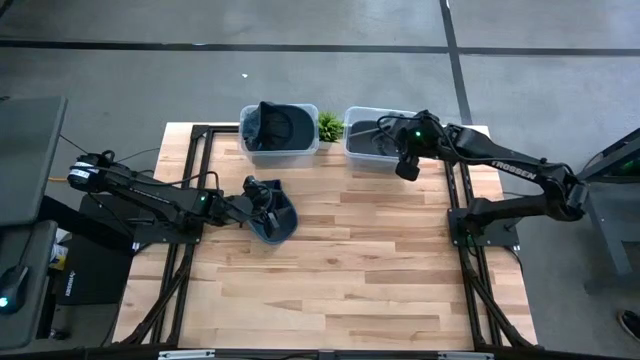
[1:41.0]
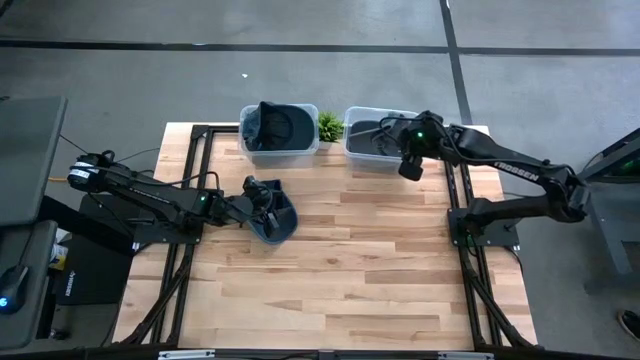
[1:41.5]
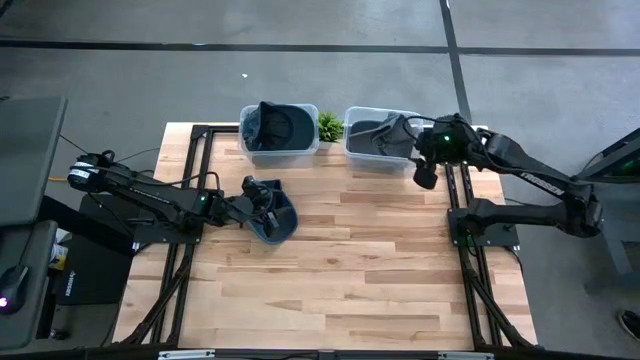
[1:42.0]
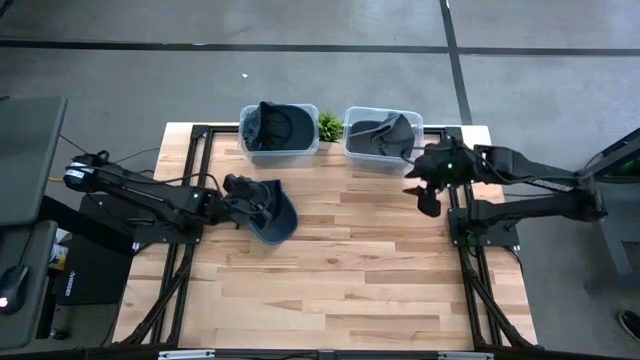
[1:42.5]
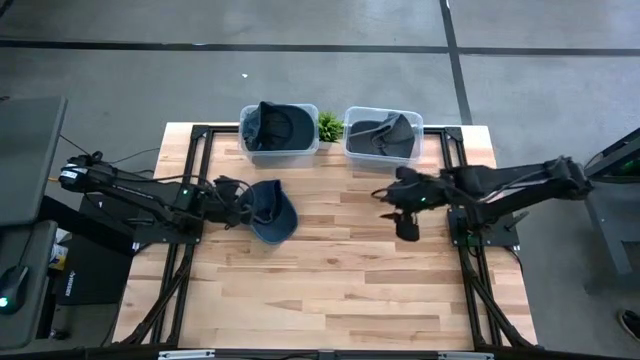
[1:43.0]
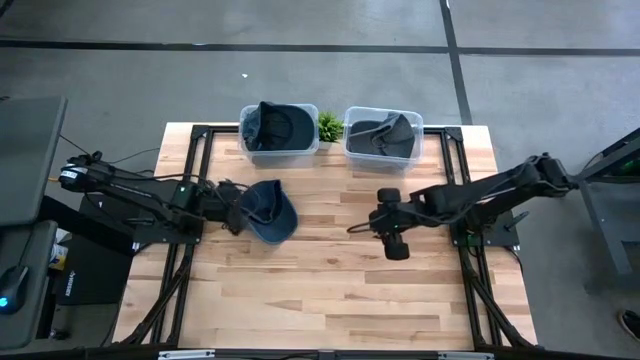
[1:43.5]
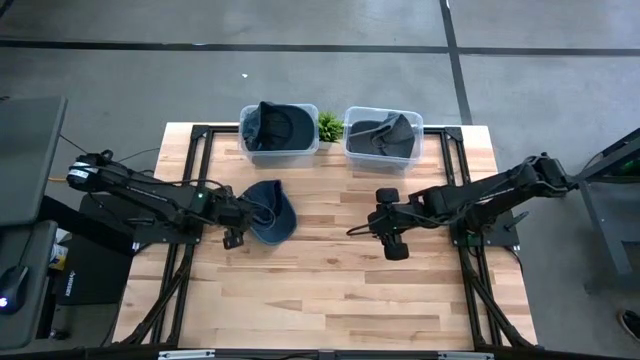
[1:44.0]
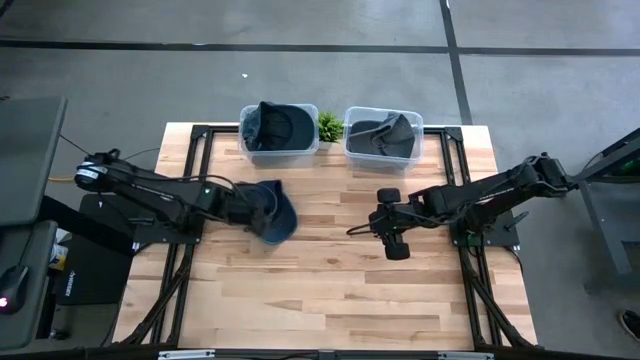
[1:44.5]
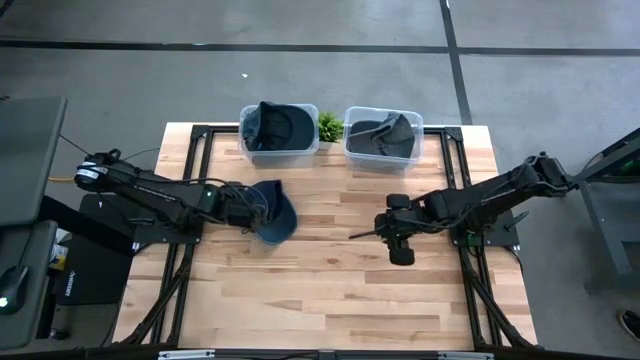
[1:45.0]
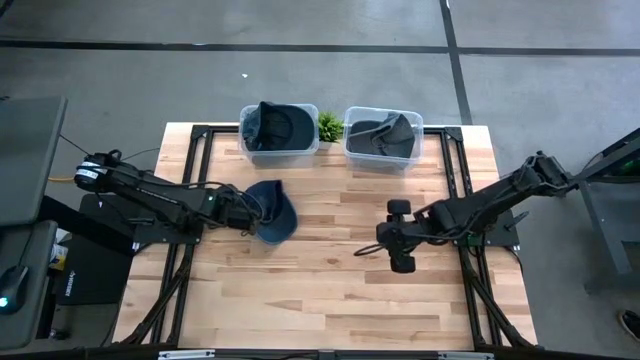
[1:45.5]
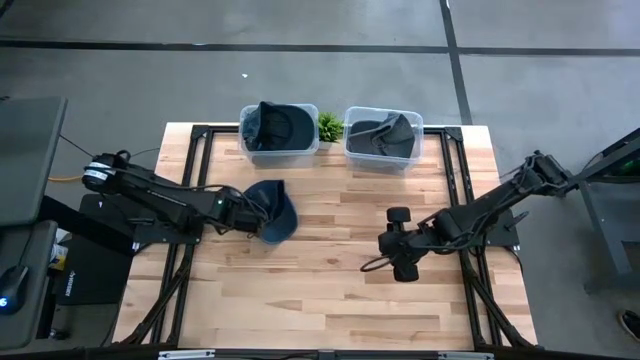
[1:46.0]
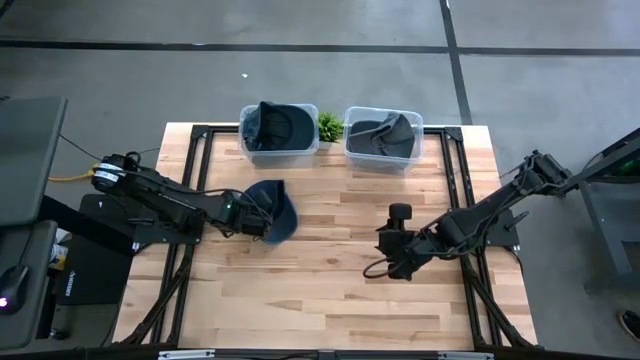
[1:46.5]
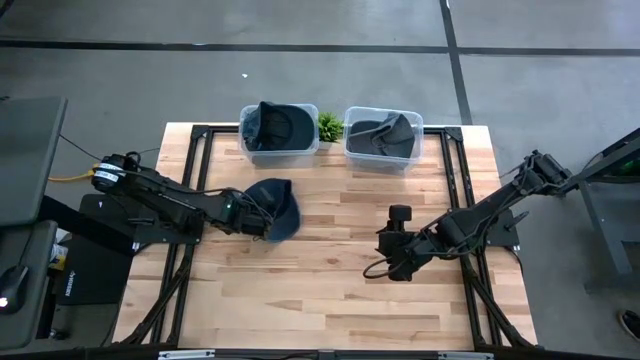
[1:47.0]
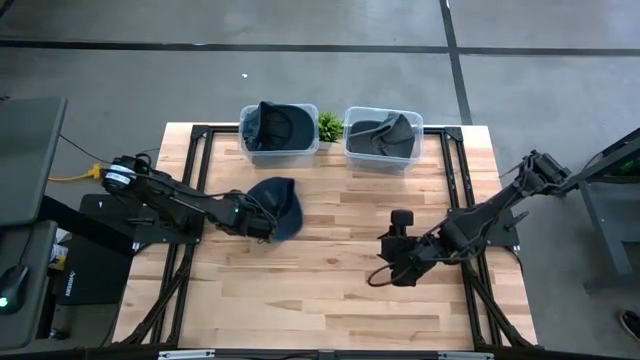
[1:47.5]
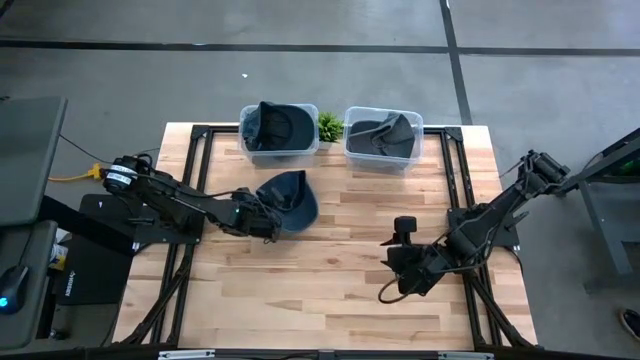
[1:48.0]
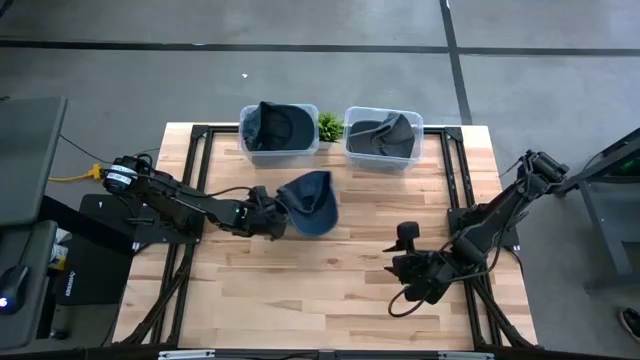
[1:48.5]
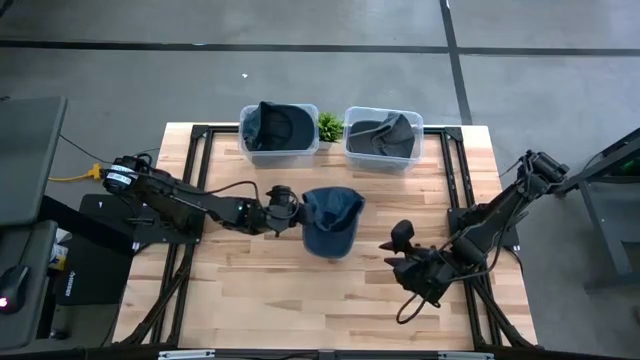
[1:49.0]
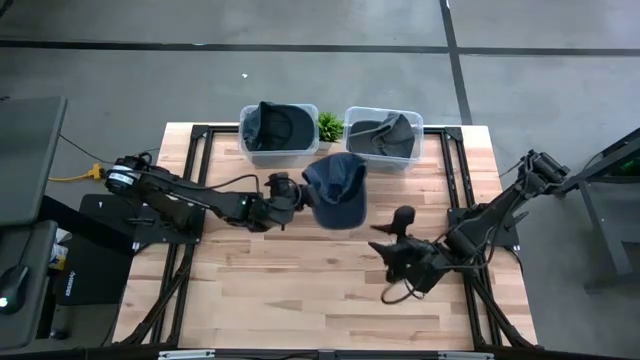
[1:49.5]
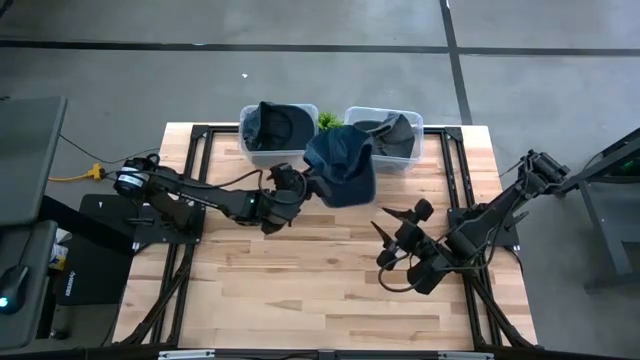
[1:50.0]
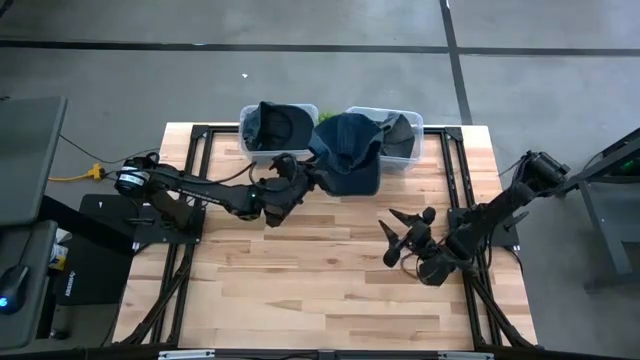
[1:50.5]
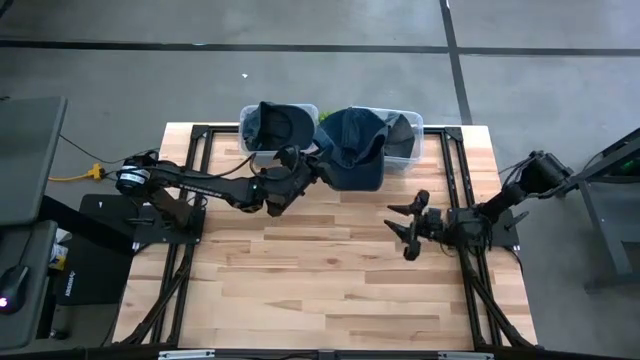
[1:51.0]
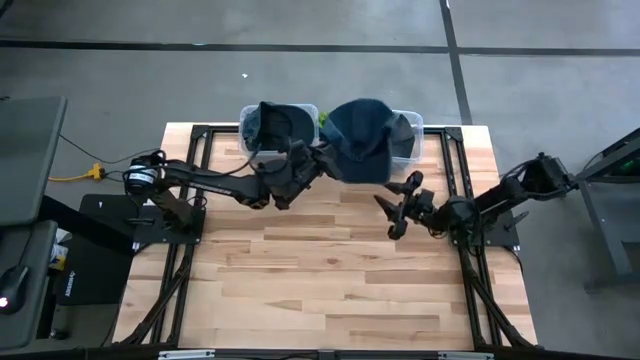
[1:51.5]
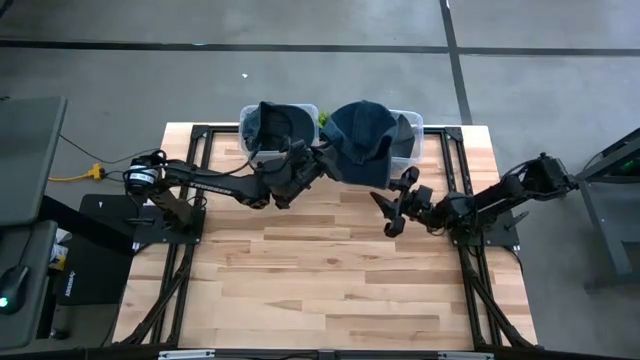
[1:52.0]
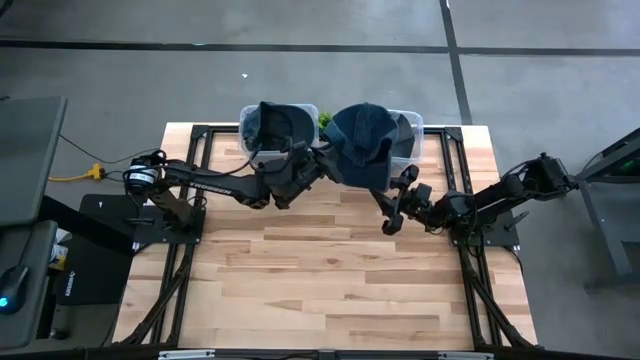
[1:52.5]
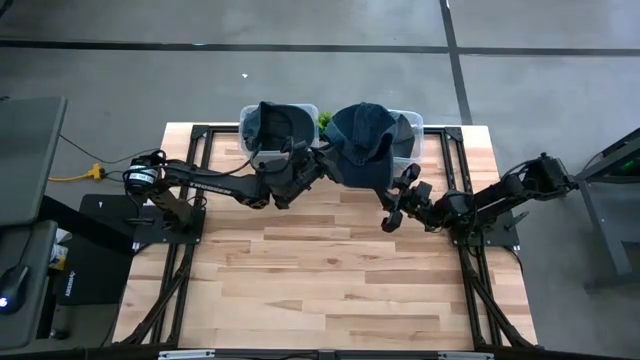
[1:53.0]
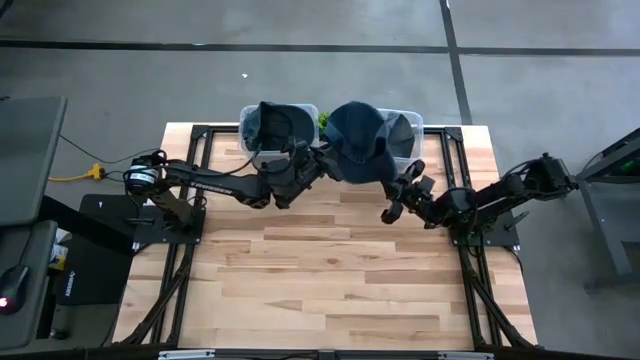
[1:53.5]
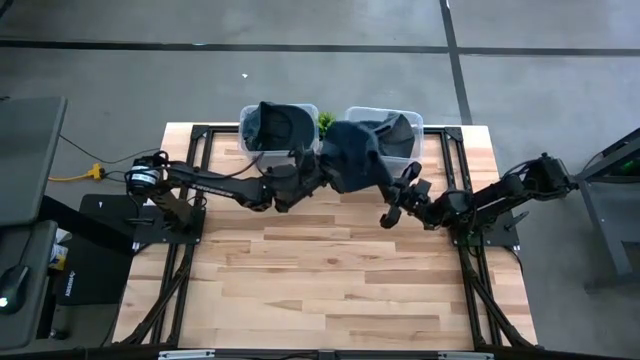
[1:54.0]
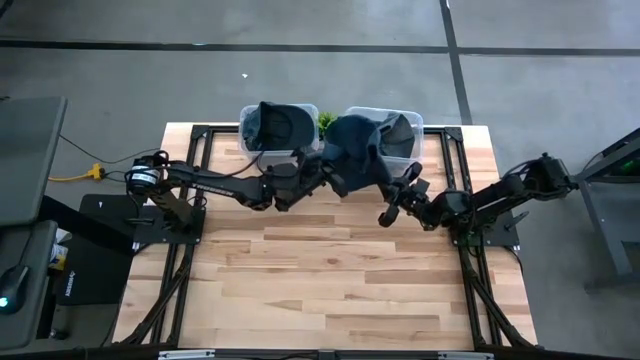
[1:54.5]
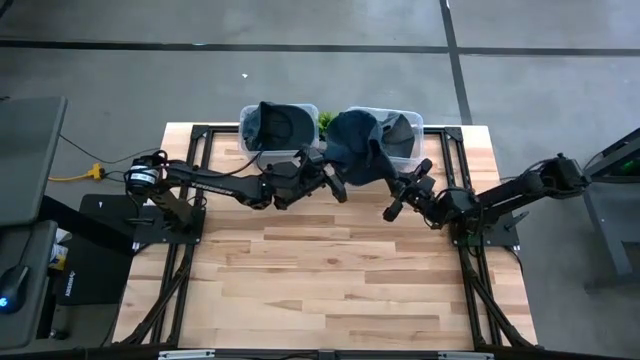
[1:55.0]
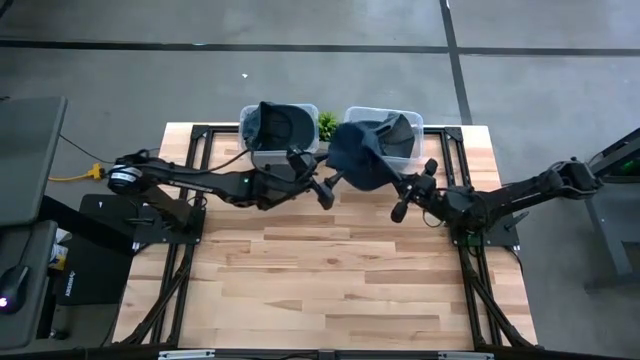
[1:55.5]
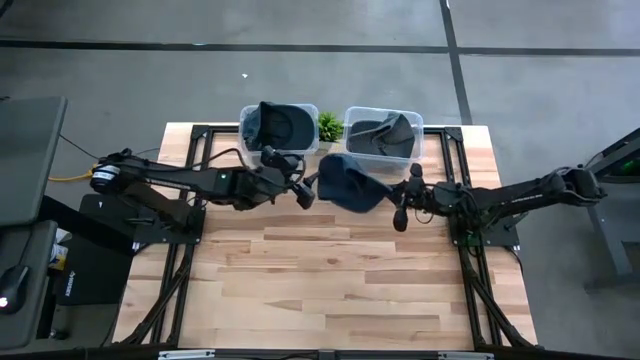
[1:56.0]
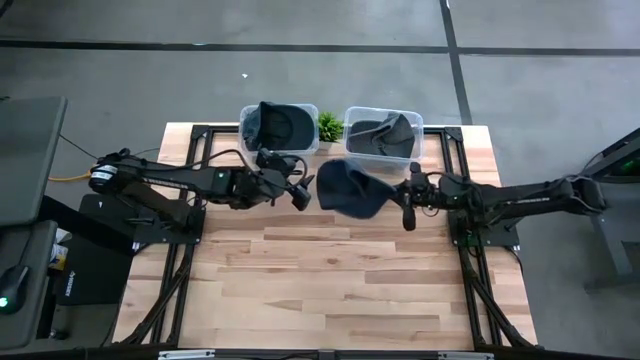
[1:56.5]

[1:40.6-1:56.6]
Task: Pick & Place hat
Put the blue cap into the left transparent bin

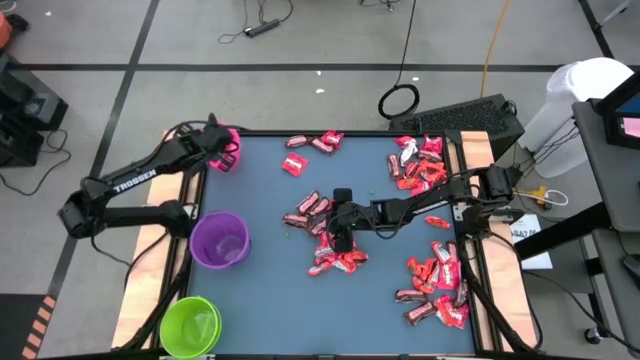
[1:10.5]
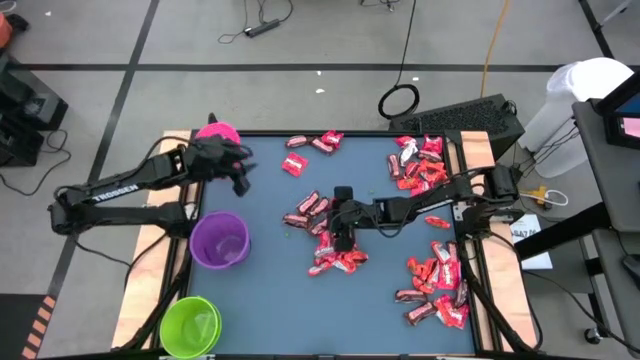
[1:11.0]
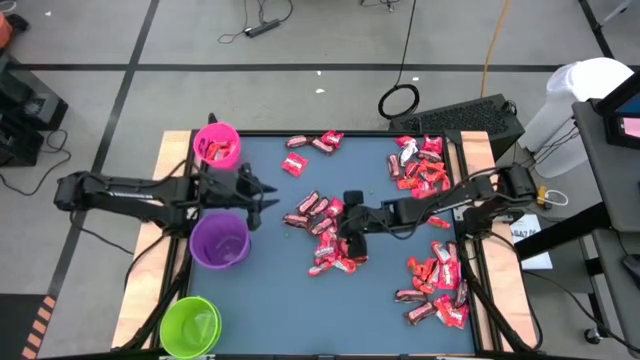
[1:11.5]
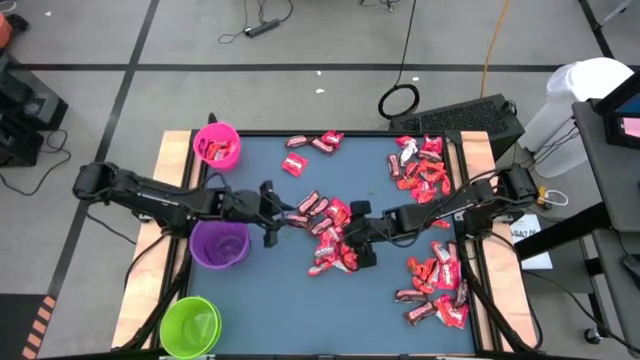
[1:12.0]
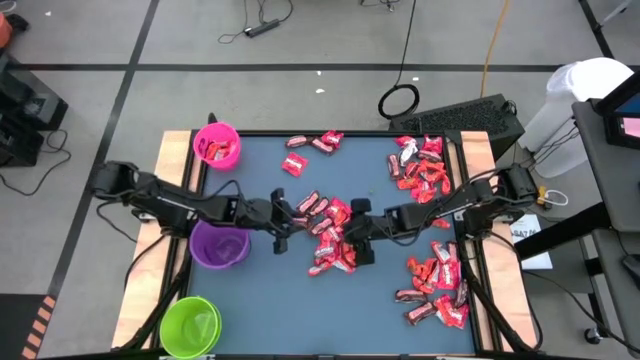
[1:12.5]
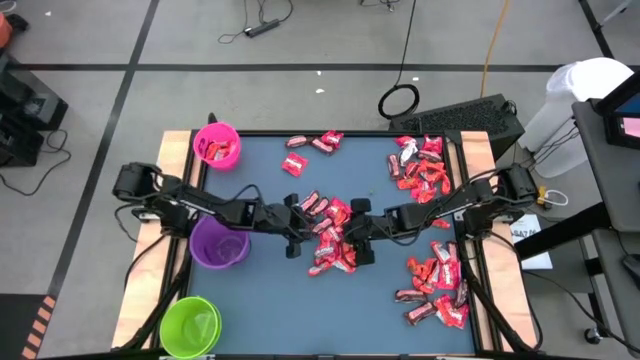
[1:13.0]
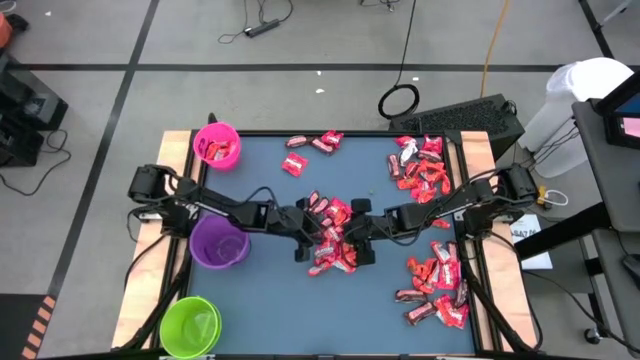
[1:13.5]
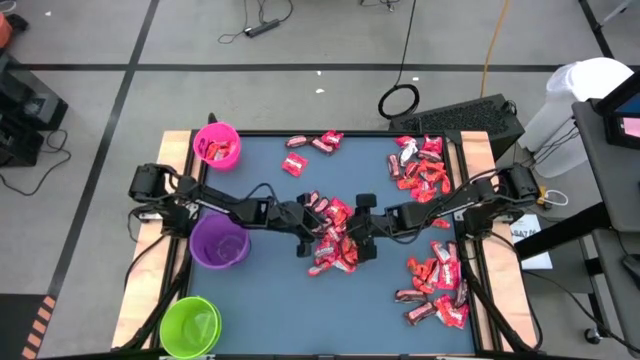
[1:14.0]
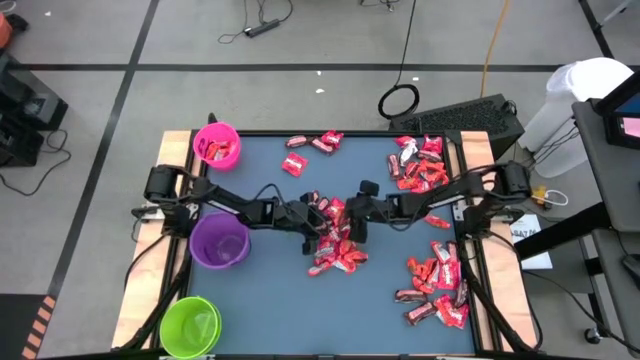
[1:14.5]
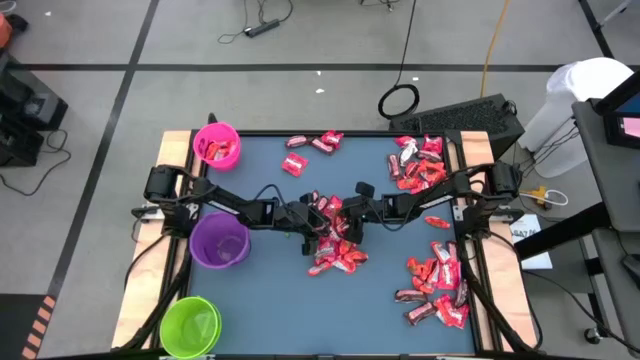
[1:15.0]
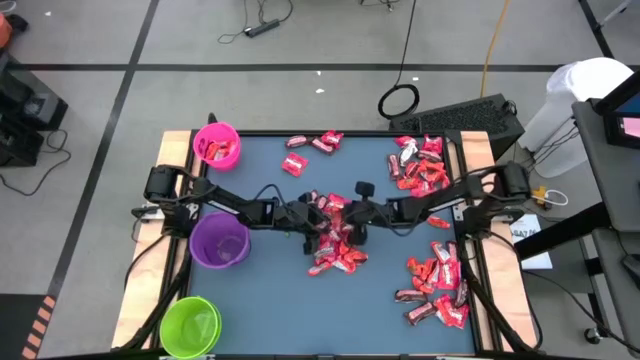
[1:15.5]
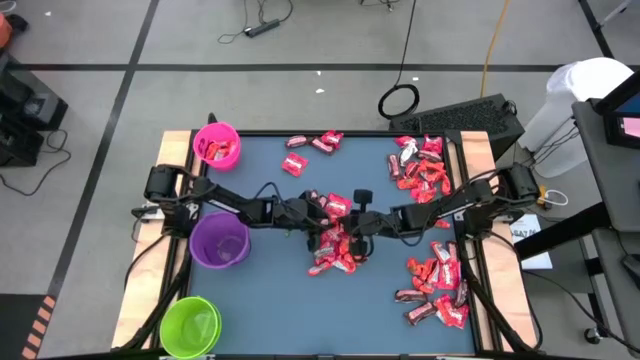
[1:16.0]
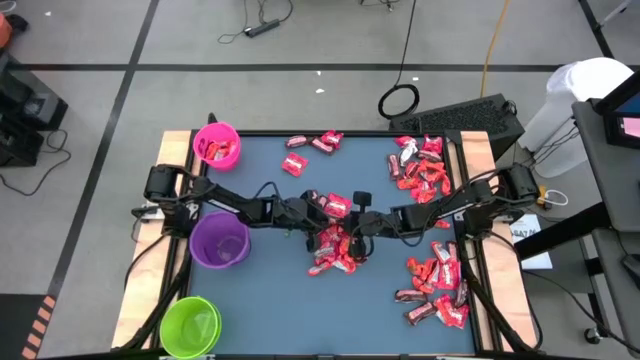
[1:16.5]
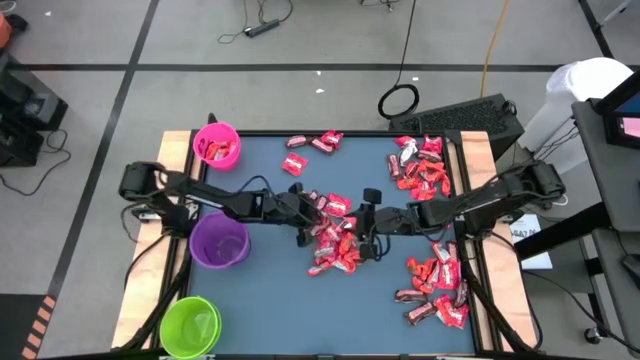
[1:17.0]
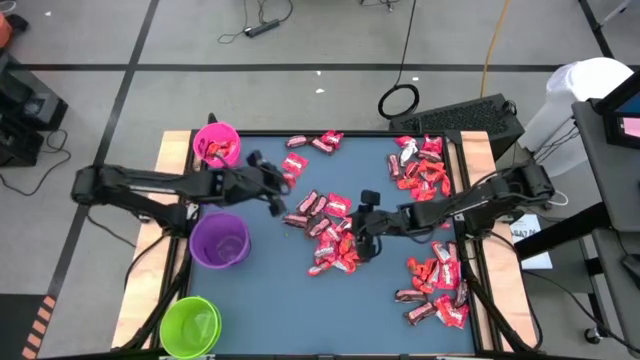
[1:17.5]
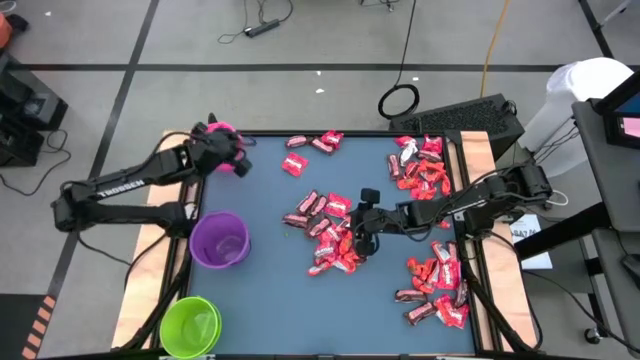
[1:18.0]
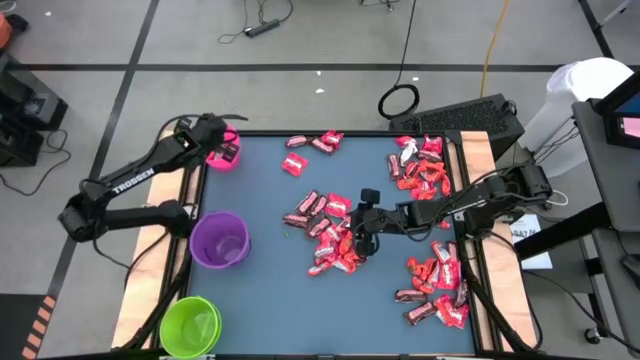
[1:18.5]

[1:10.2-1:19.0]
Task: Organize candy in baskets
Put the orange chocolate into the pink bucket
